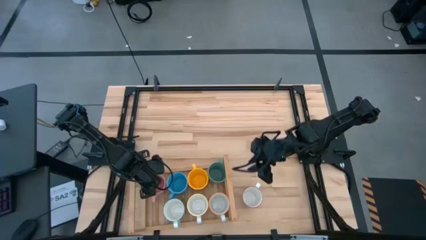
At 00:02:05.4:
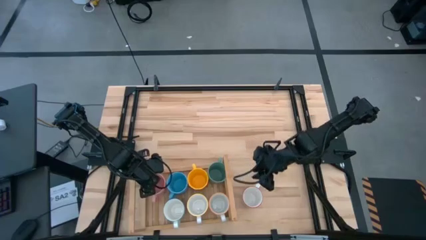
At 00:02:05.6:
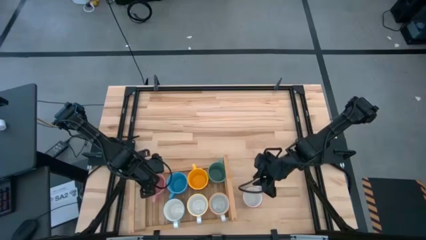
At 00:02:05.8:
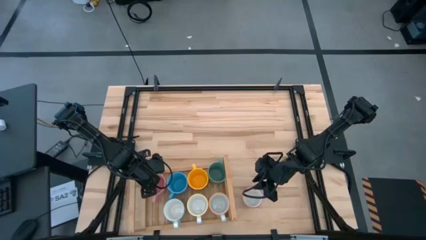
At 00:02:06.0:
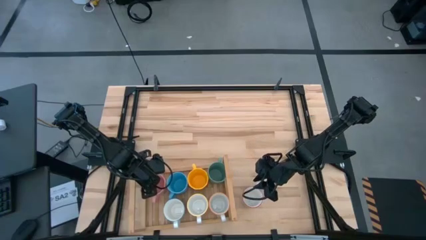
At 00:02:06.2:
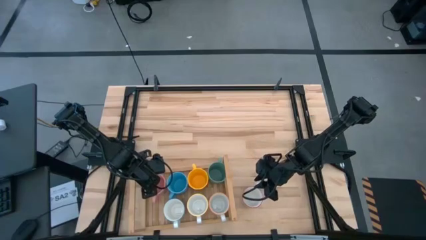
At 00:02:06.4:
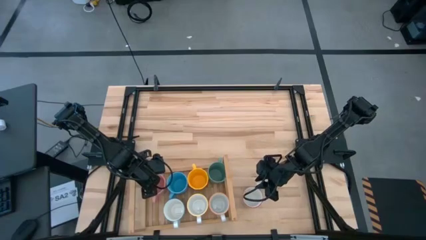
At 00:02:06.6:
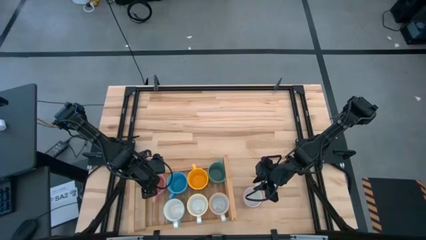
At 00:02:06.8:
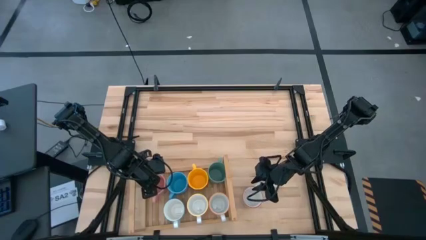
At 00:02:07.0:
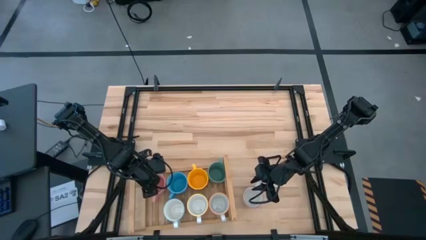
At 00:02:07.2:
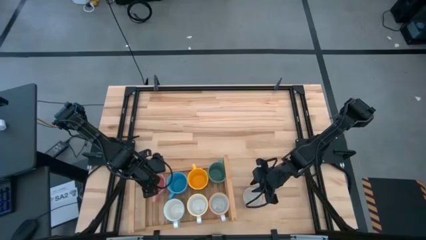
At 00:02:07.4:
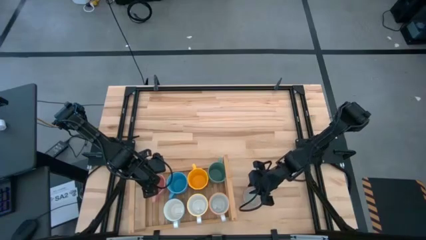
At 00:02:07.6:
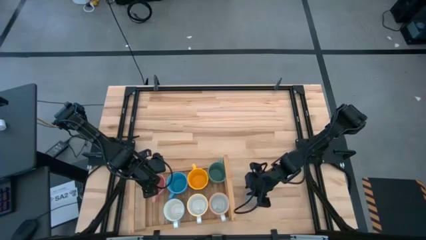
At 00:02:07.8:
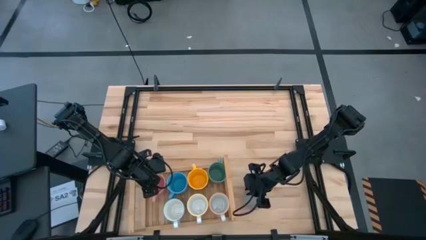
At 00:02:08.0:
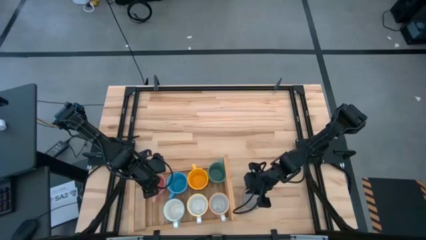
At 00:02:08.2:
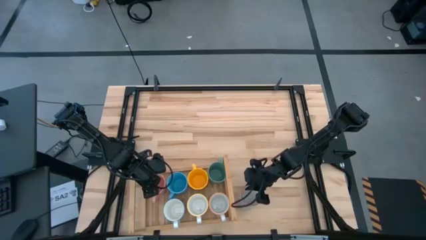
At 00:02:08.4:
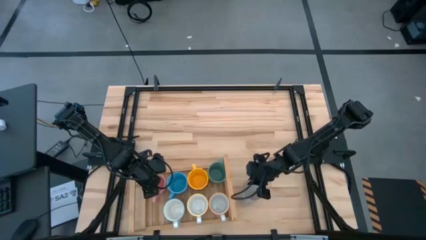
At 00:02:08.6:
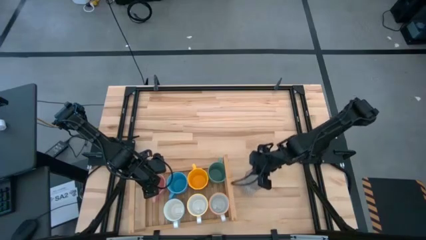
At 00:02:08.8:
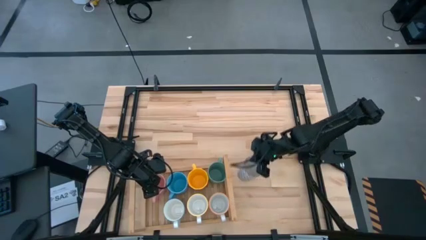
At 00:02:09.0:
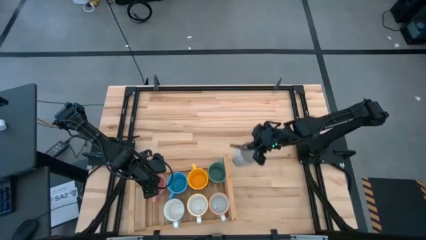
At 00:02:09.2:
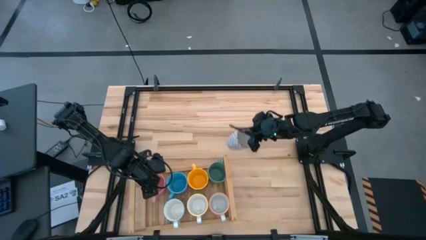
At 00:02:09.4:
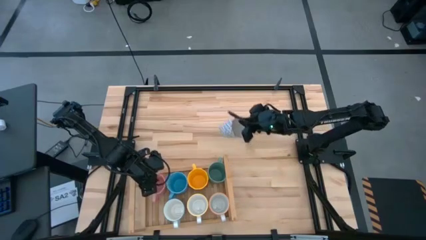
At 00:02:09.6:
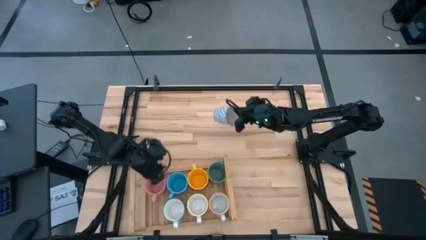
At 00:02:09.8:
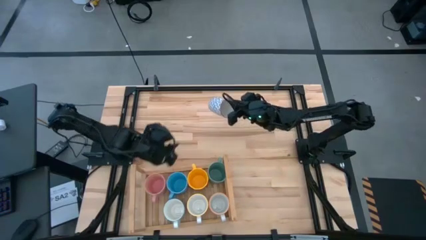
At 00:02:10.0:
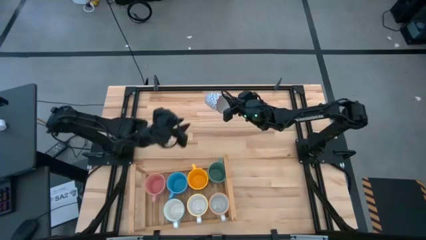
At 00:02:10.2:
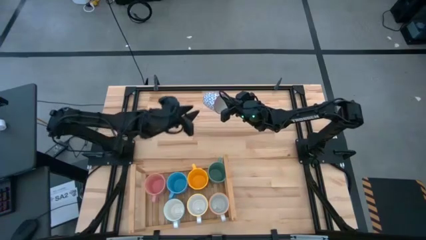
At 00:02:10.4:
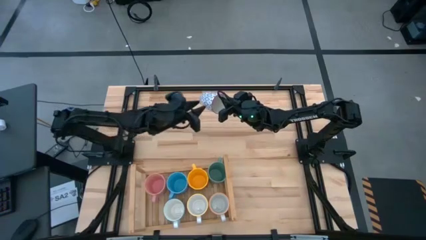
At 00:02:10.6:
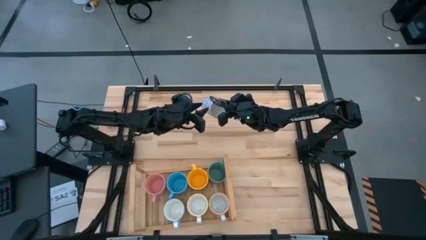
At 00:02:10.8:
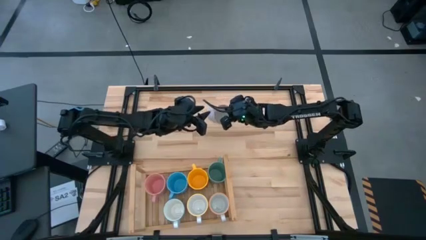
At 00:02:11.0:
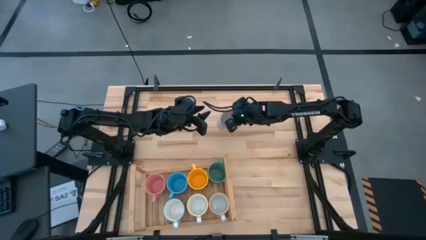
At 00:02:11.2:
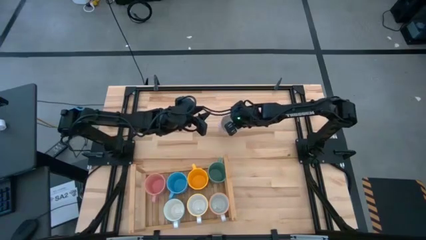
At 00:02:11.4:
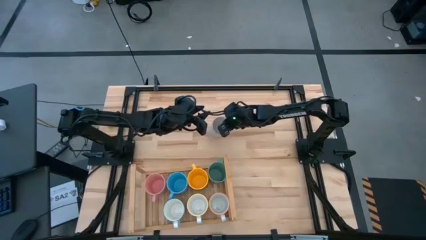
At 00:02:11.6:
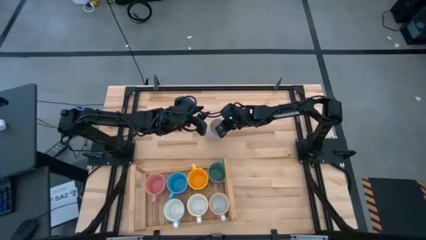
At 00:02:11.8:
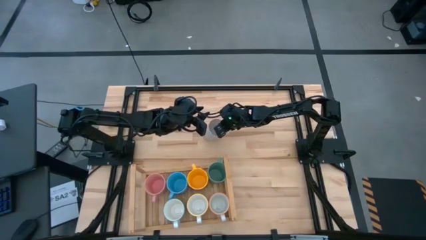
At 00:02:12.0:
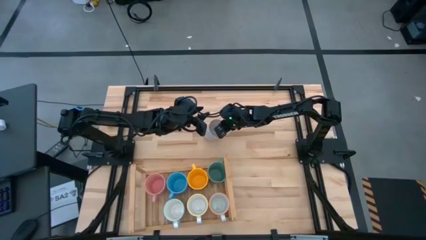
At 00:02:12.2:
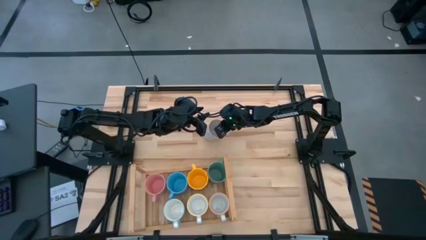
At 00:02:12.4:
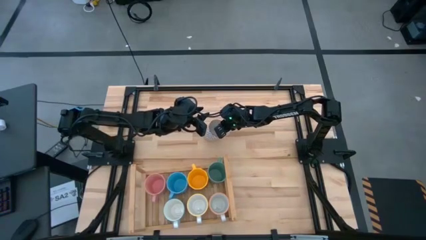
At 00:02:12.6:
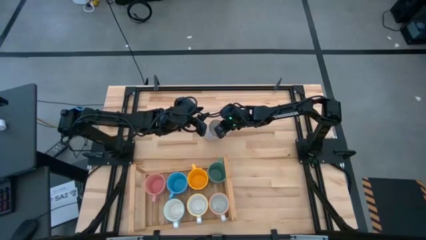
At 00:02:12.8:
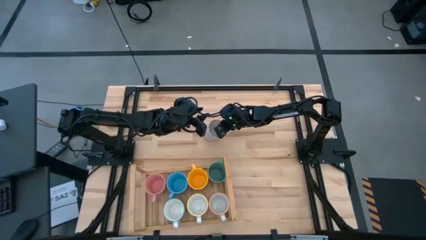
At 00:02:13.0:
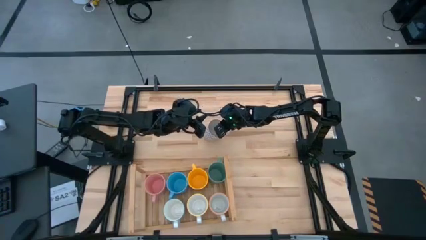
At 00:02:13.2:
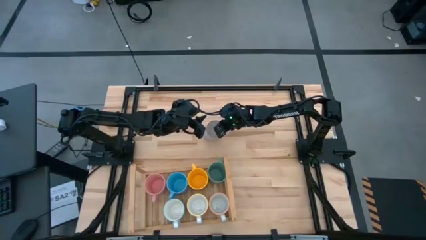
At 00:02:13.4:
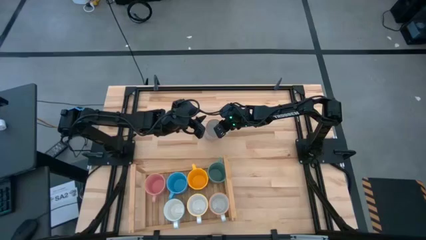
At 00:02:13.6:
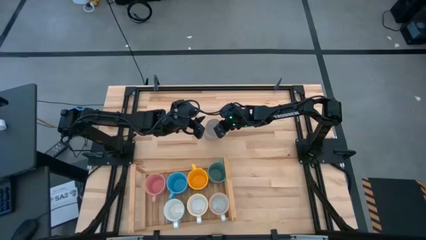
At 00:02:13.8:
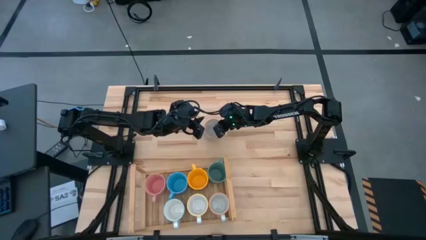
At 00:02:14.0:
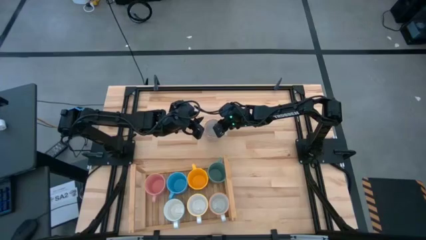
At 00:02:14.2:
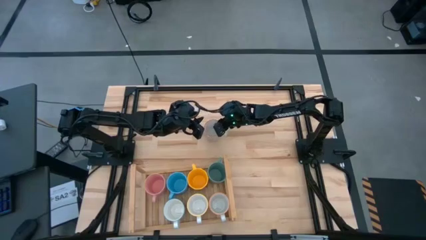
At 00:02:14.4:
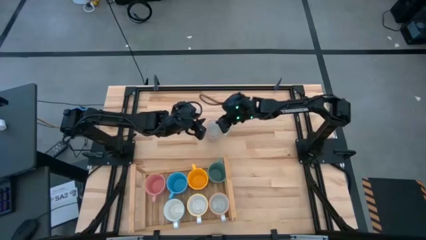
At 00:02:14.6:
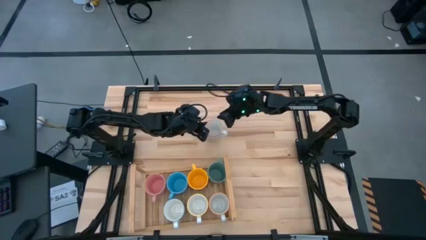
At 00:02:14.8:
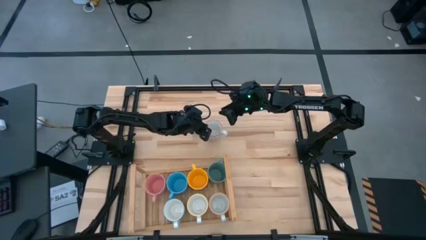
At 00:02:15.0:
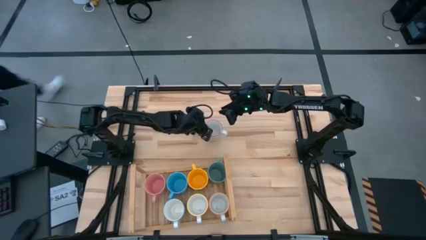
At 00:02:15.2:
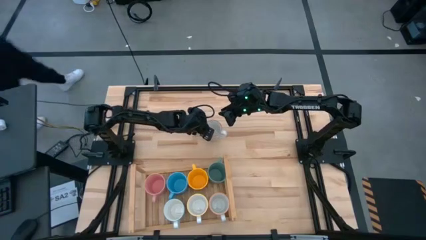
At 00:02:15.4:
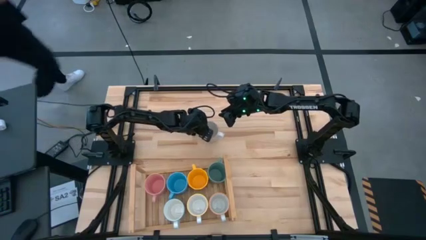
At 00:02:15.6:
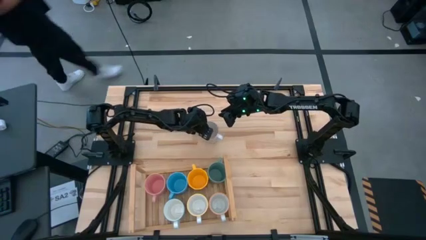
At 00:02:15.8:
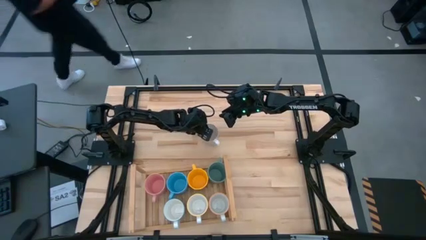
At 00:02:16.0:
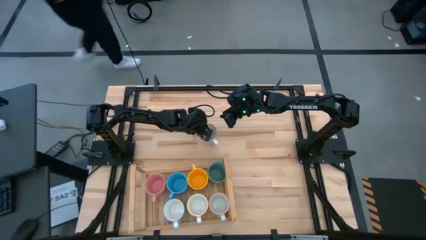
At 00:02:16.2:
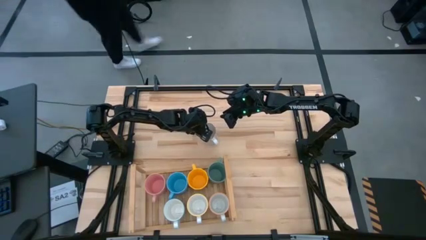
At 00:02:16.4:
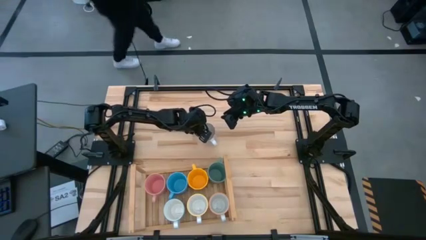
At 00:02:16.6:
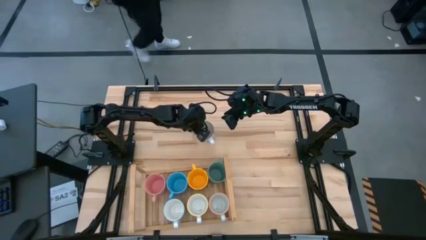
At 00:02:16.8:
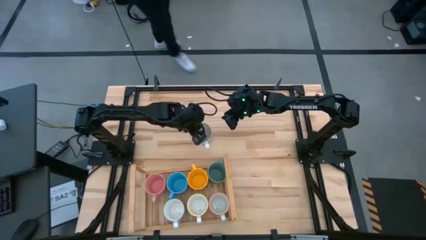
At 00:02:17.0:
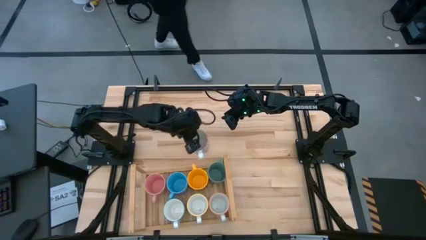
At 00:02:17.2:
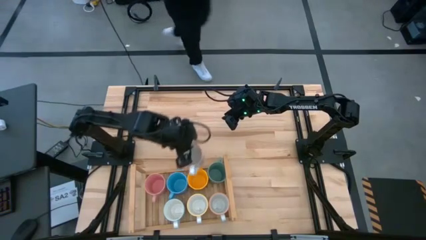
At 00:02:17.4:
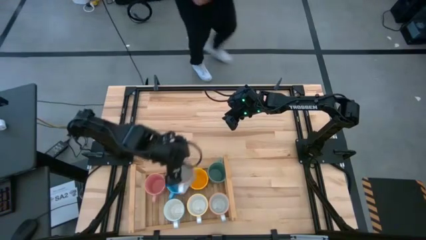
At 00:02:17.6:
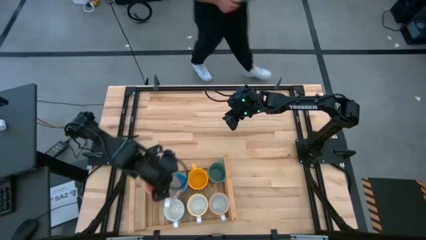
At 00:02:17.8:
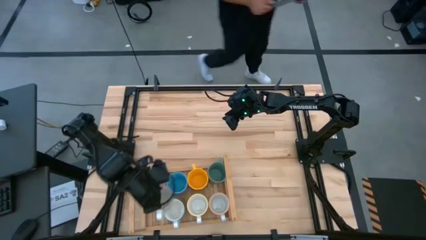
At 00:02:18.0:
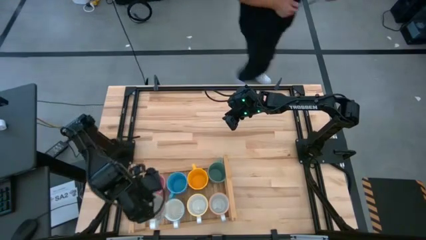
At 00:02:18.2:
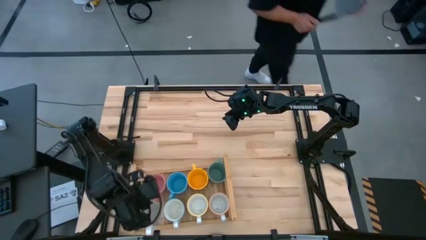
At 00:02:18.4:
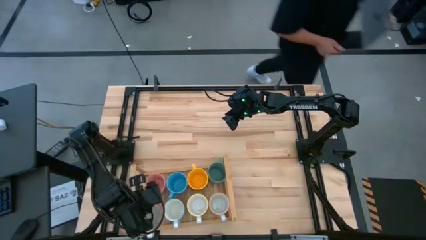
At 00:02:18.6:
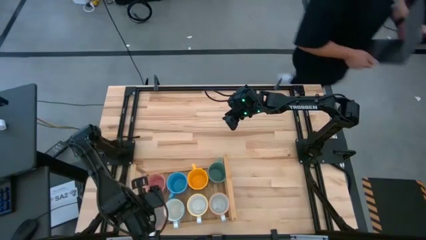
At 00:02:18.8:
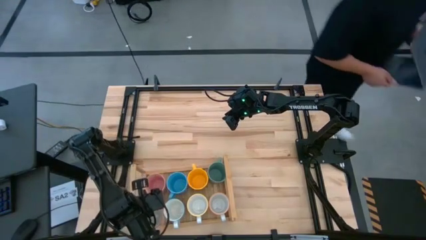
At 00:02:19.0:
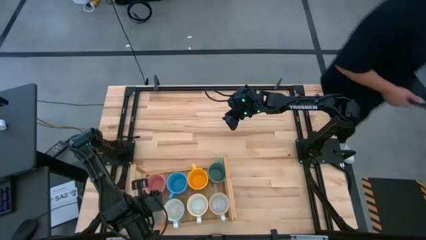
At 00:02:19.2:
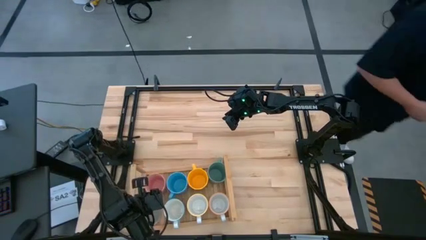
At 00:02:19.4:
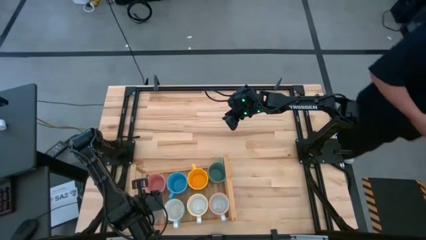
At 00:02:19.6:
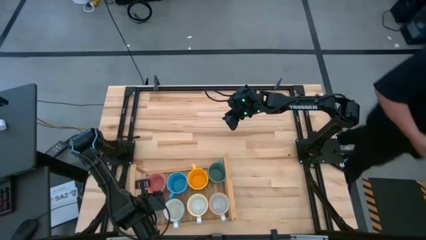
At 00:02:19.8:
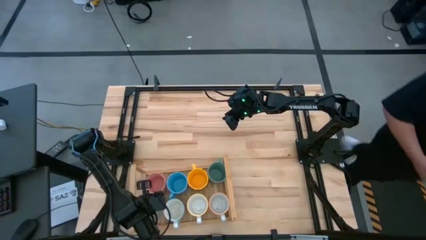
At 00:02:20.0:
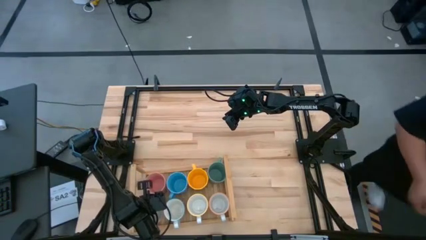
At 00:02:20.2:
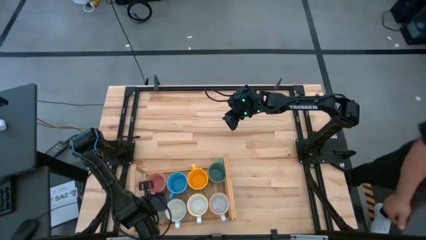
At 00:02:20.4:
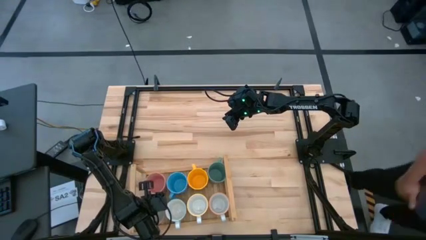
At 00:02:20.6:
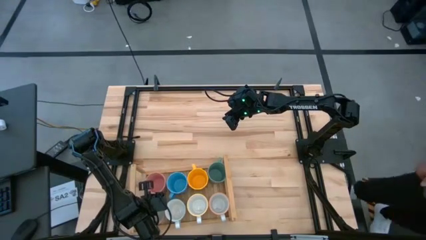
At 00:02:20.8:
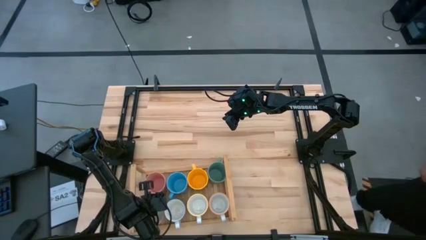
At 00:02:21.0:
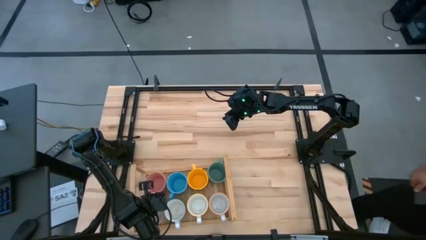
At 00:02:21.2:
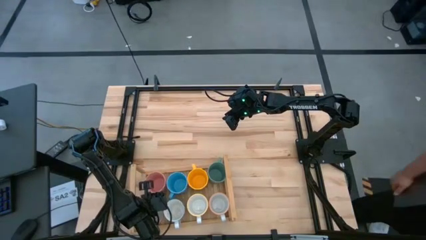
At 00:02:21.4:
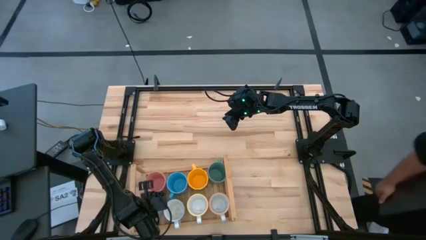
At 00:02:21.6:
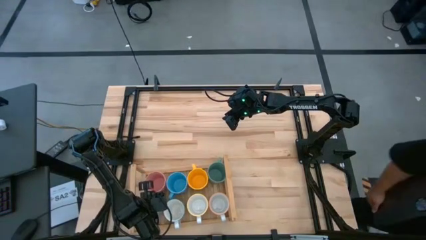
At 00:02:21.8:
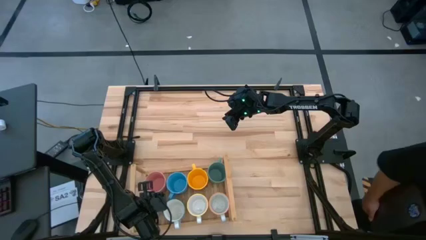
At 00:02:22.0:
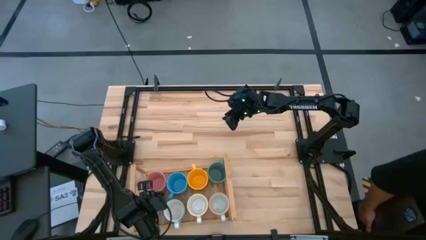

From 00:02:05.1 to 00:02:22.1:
Task: Place coffee mugs
Put the gray mug on the shelf
